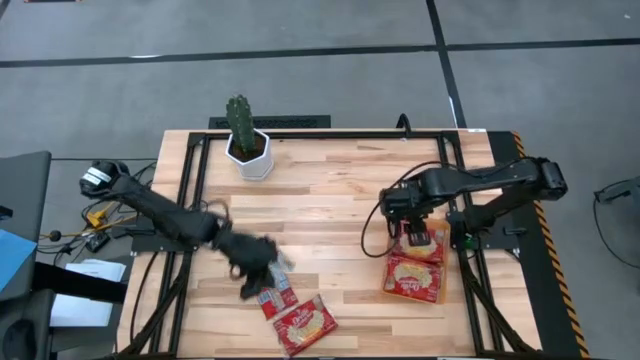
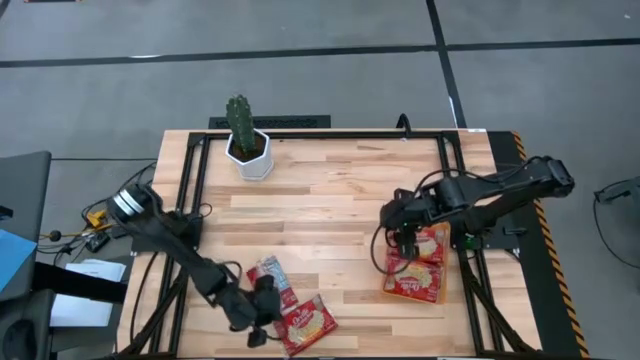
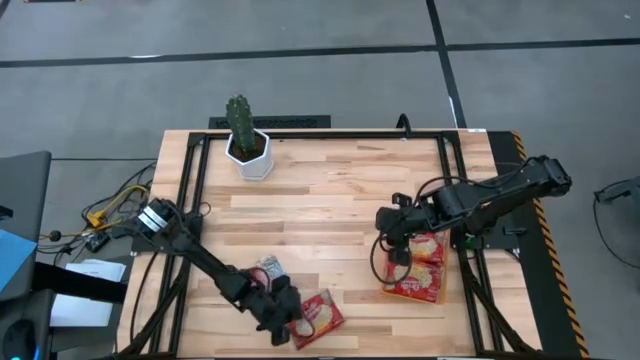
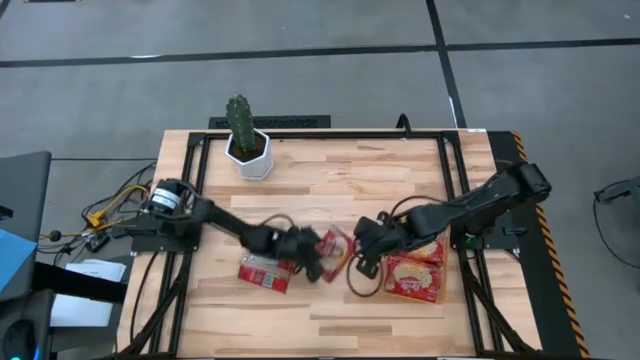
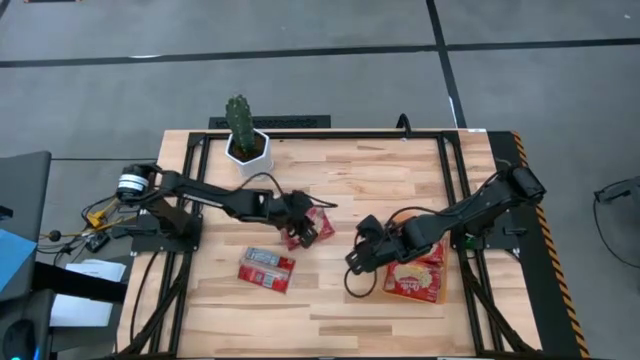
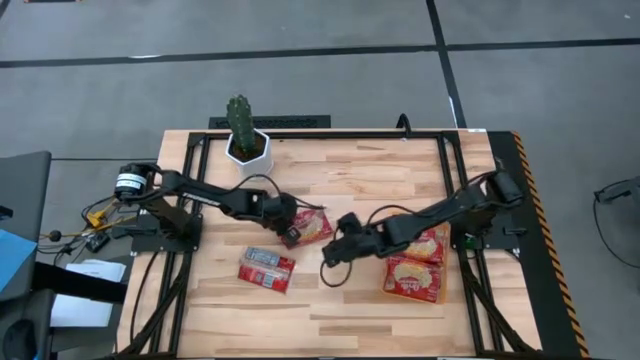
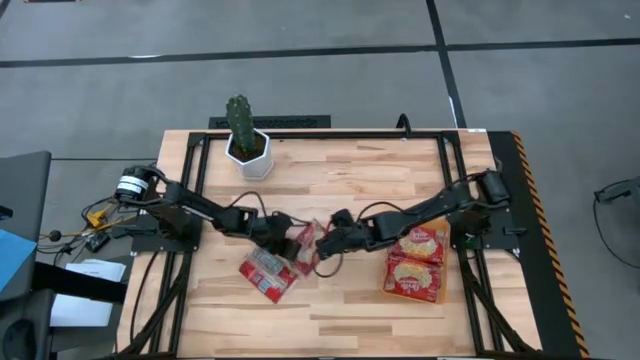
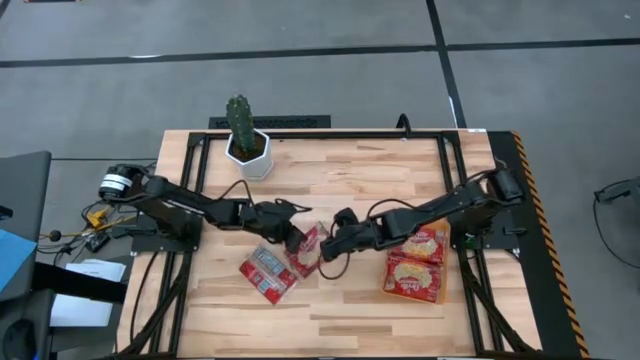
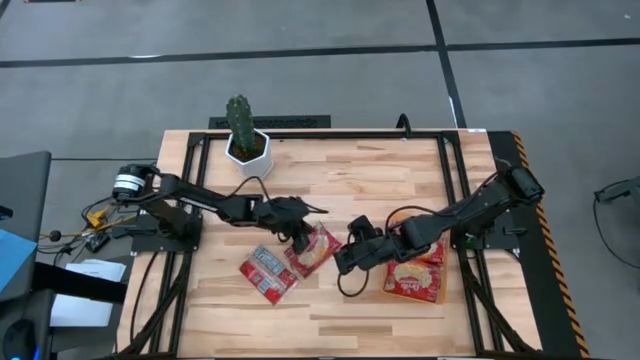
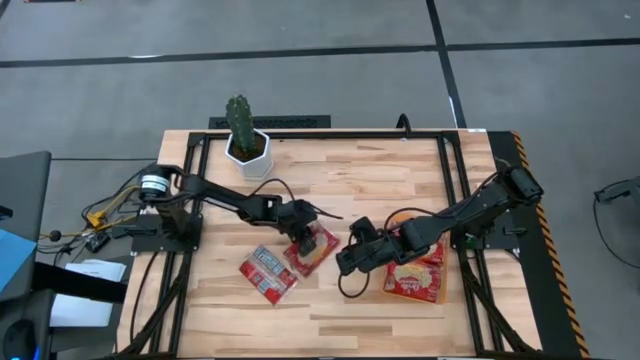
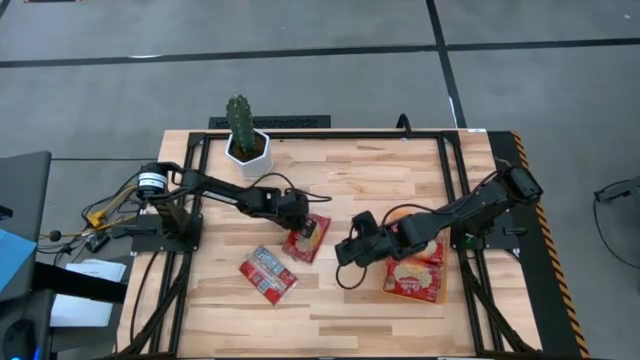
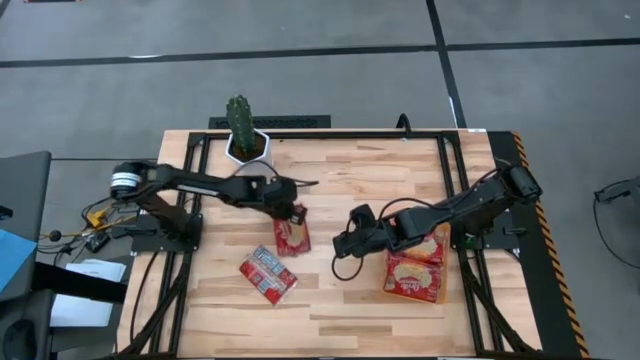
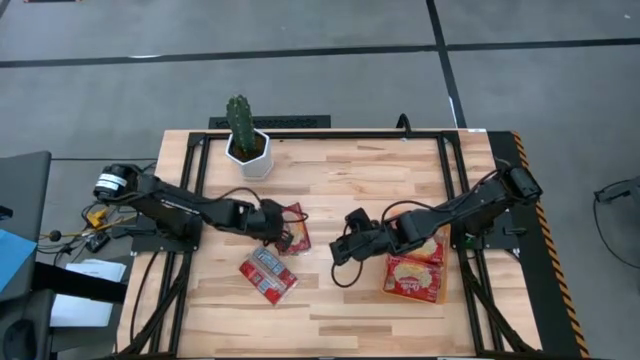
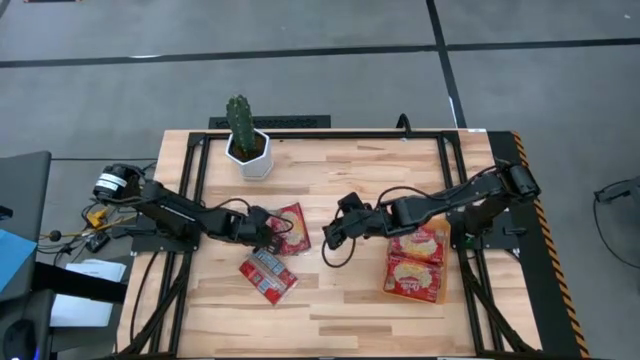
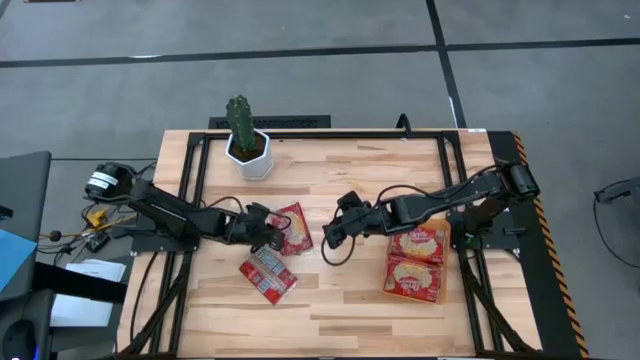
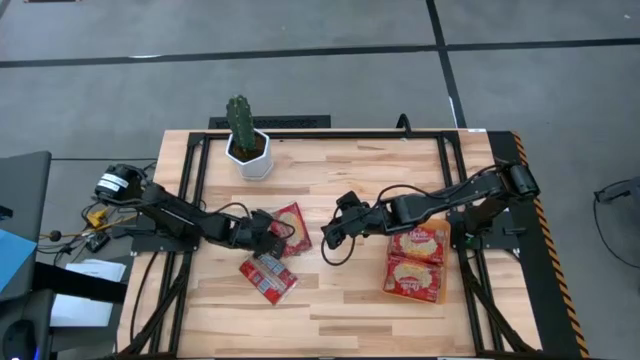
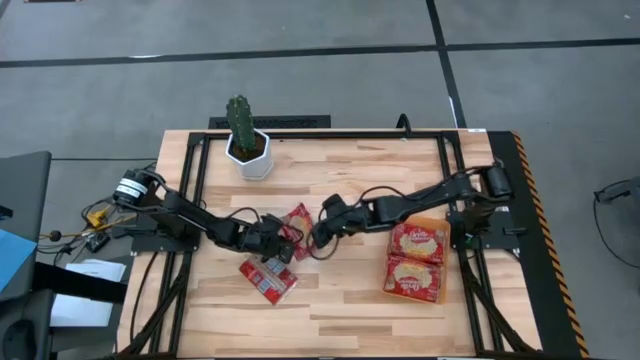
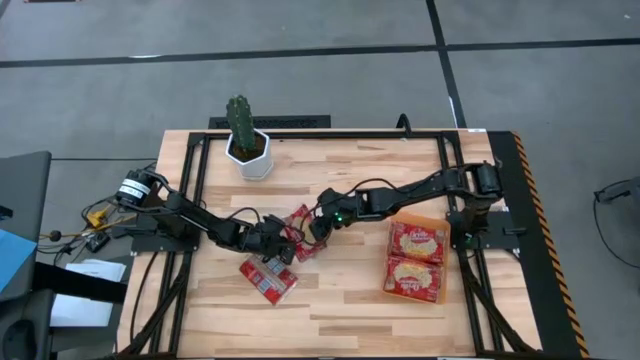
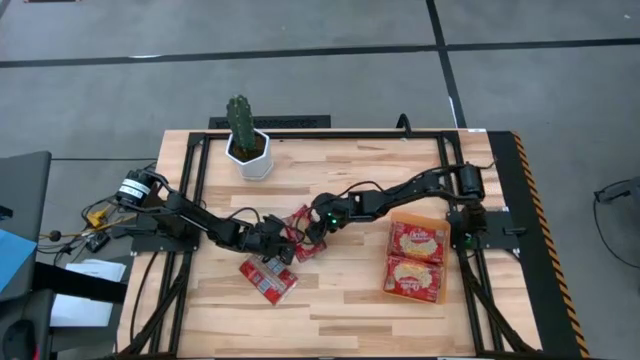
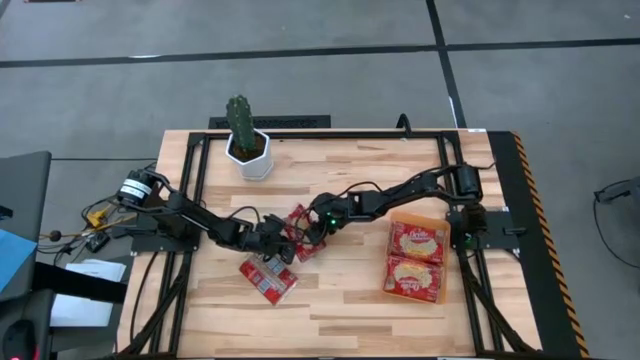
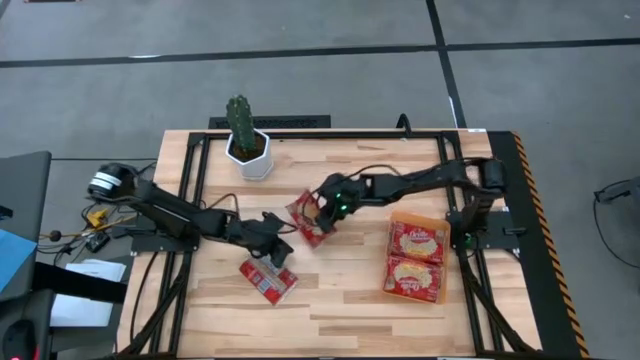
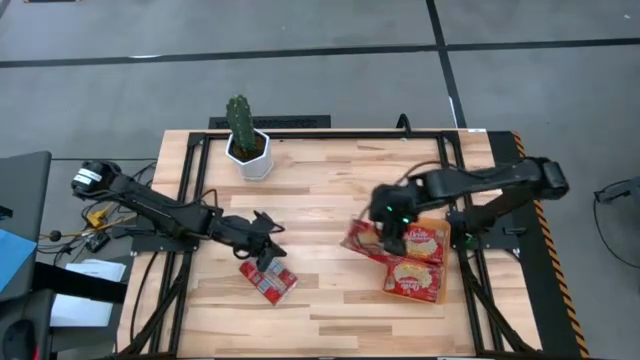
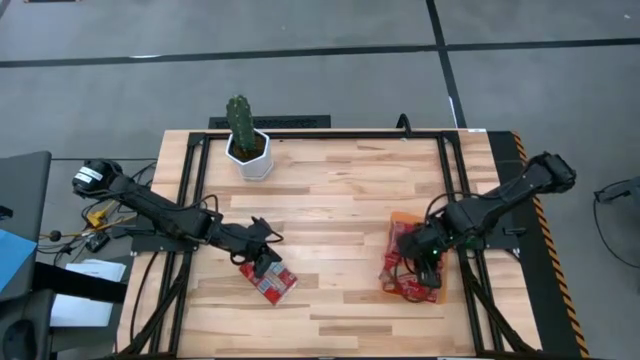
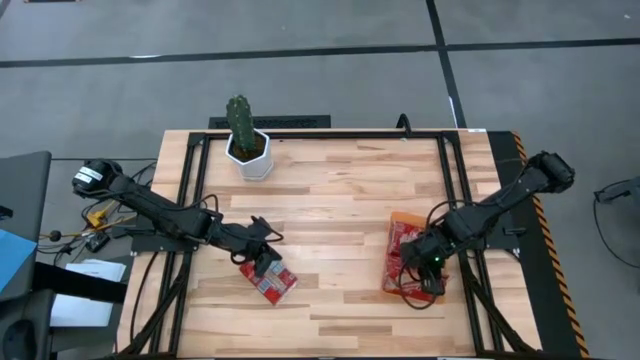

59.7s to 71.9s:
Task: Sort popcorn bags into baskets
Put the popcorn bag into the orange bin

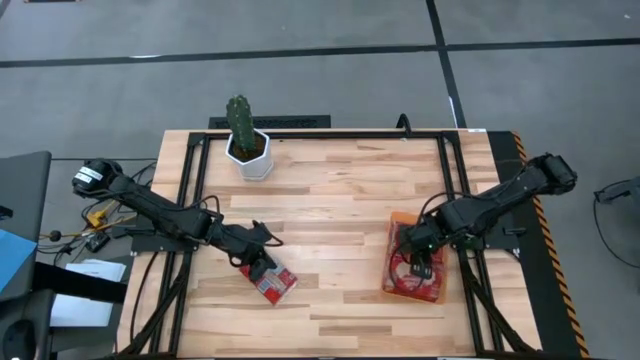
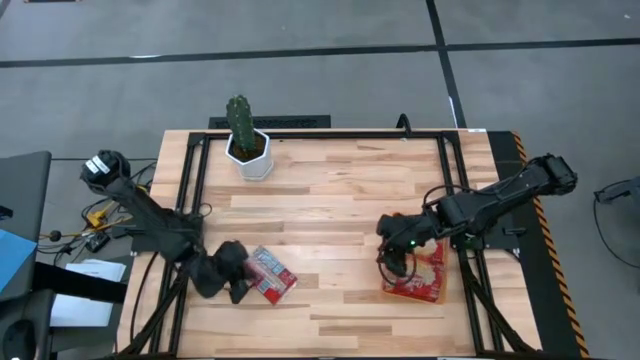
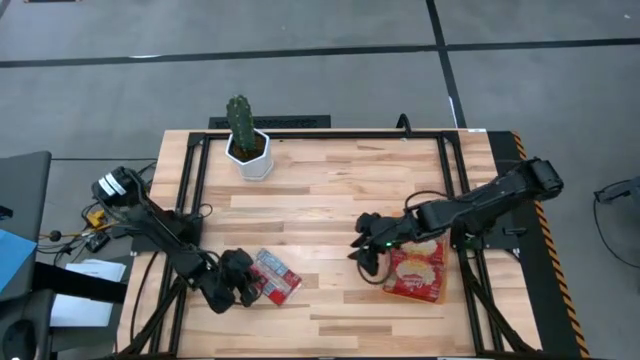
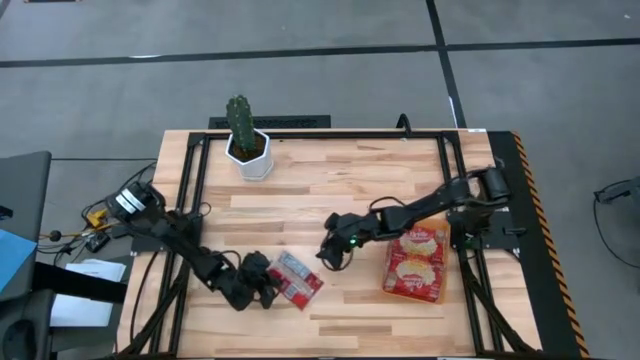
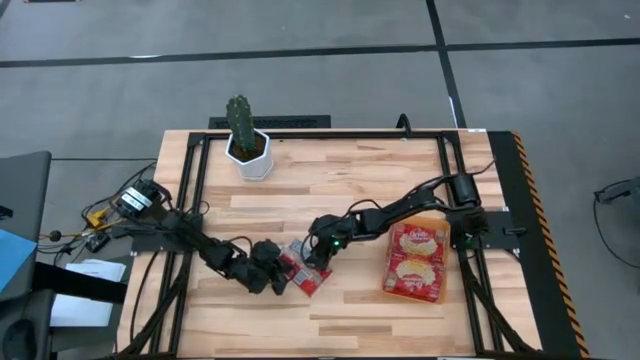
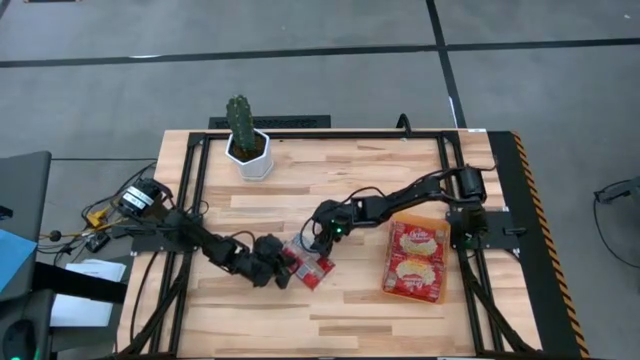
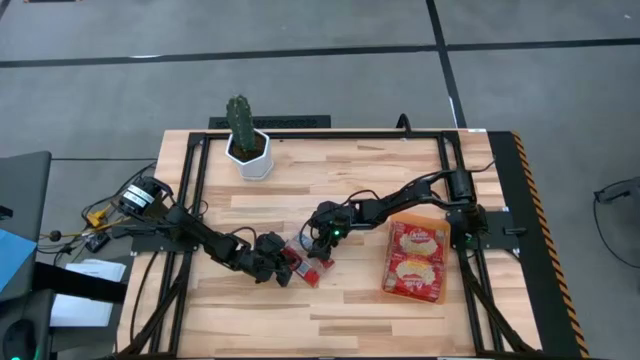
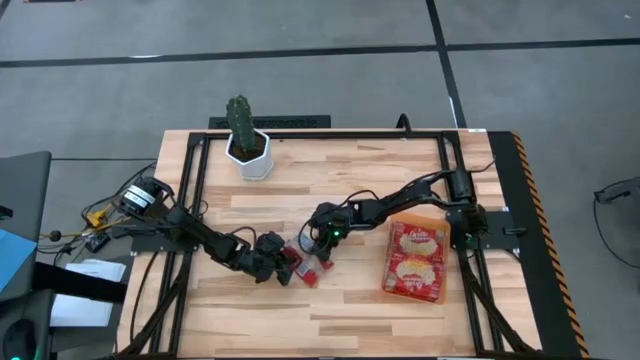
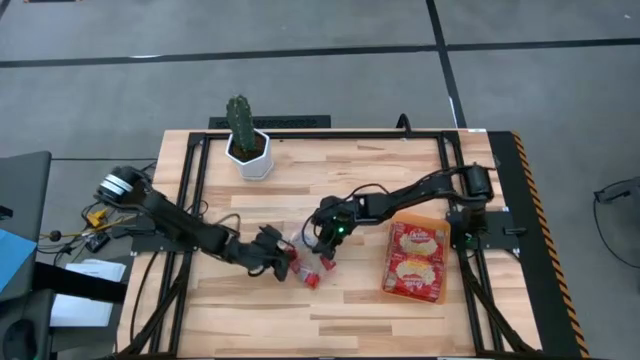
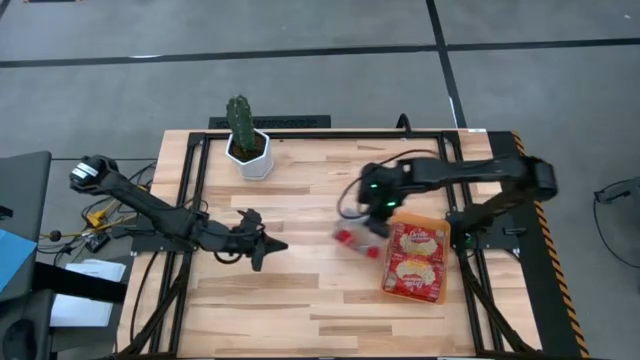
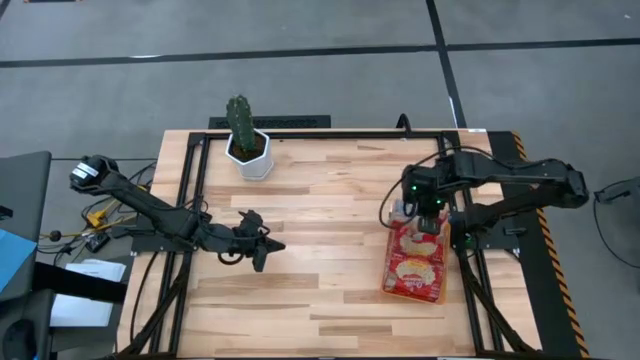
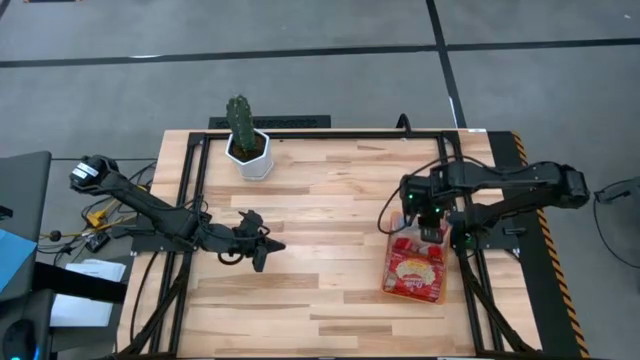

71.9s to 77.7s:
Put the popcorn bag into the orange bin

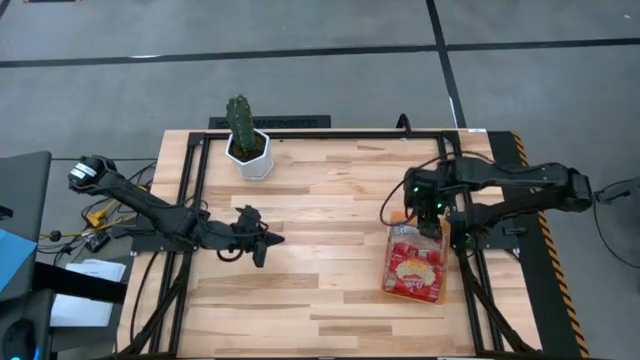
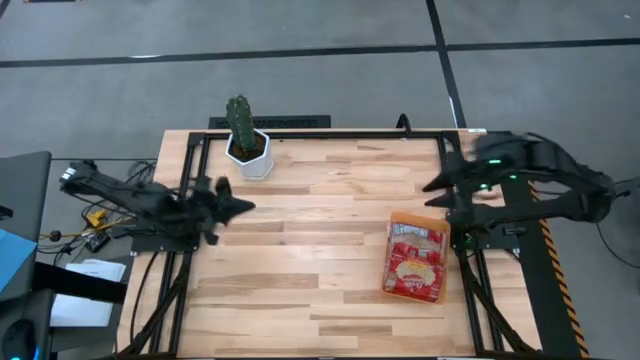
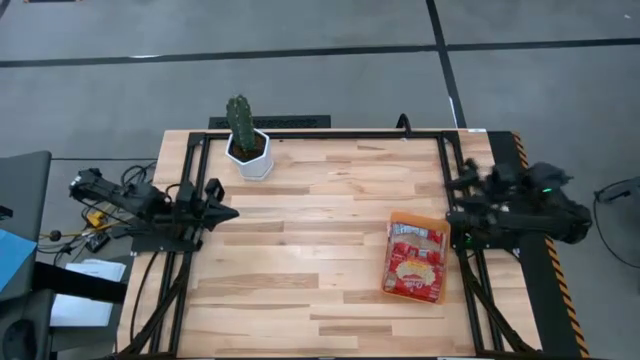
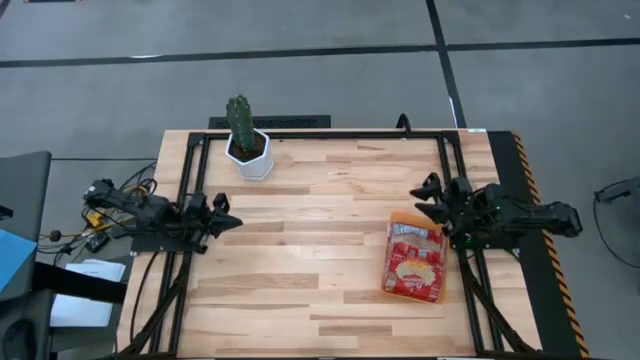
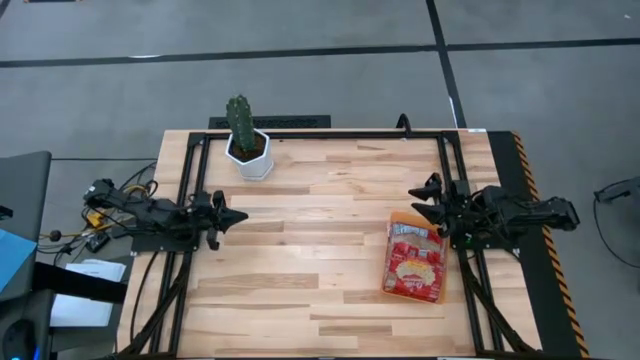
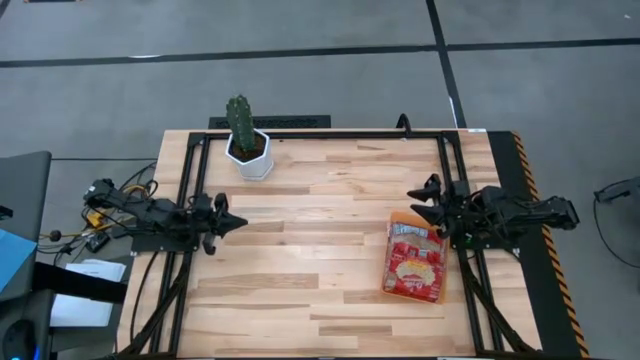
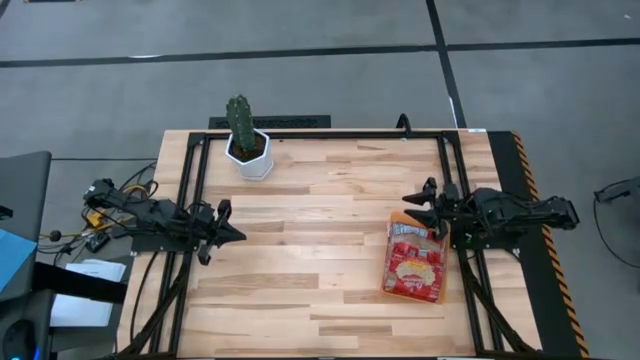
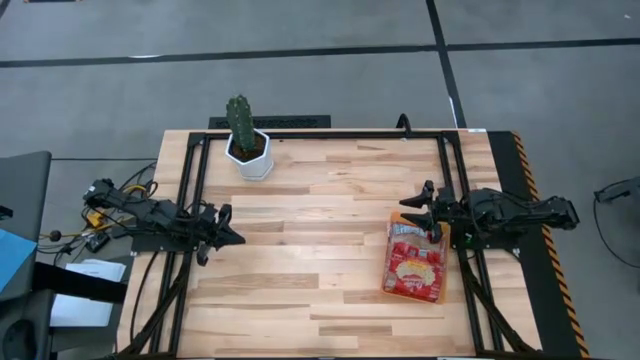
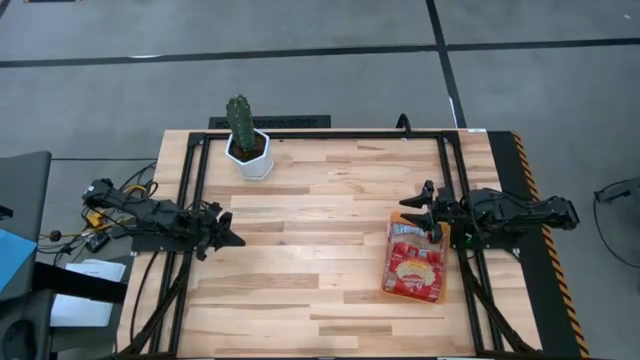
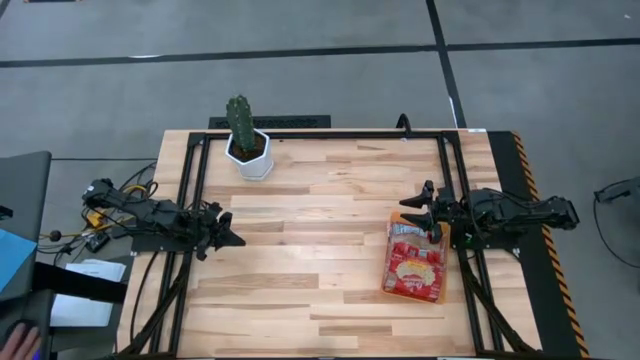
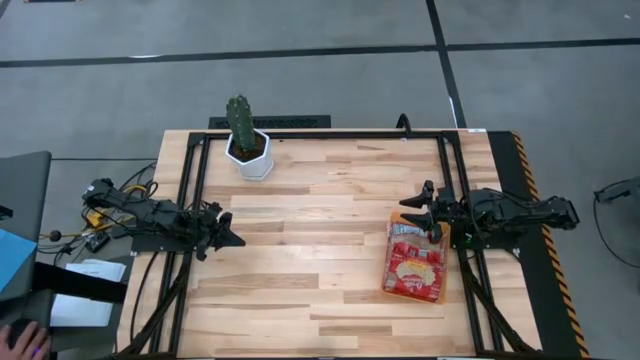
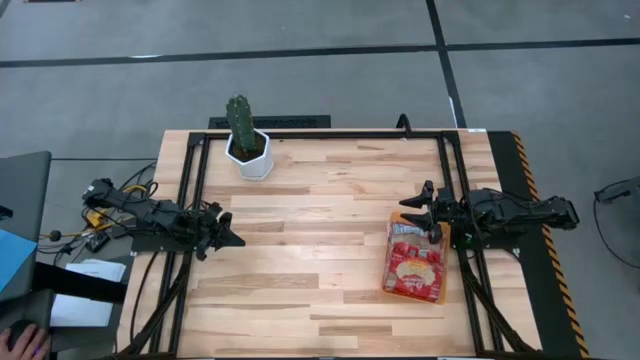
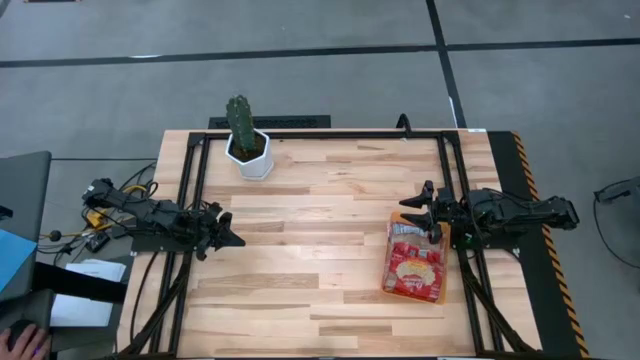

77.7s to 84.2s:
Return to Home Position
